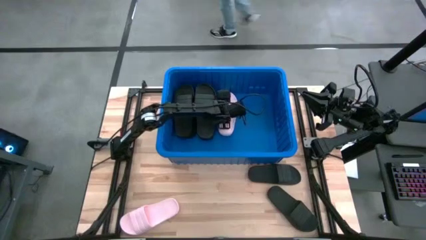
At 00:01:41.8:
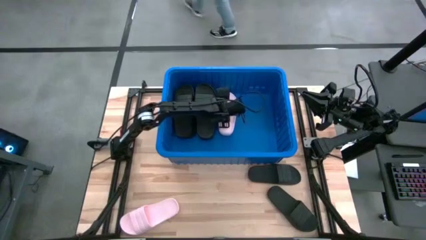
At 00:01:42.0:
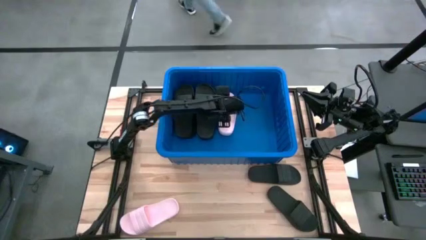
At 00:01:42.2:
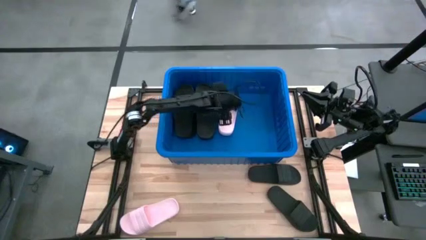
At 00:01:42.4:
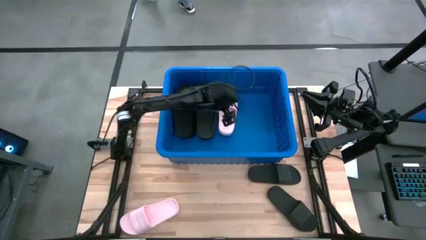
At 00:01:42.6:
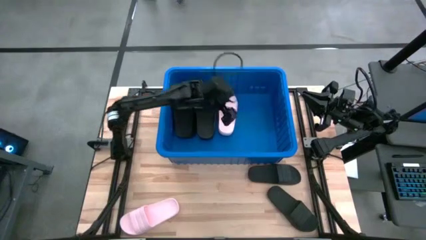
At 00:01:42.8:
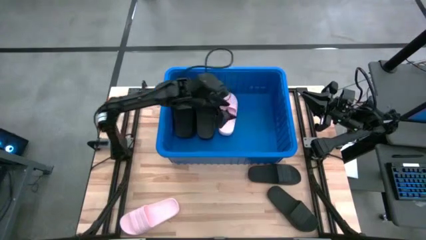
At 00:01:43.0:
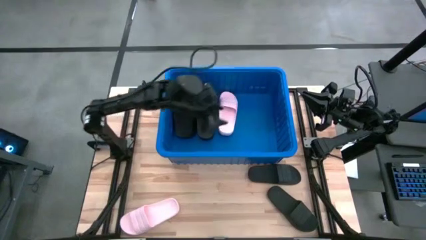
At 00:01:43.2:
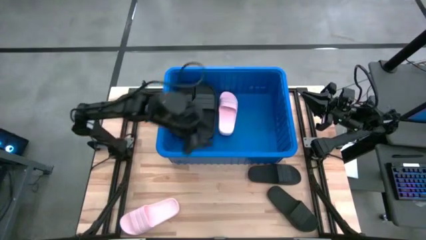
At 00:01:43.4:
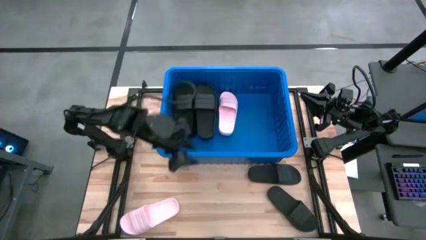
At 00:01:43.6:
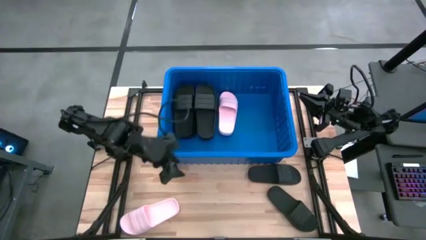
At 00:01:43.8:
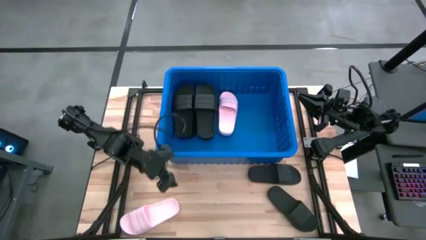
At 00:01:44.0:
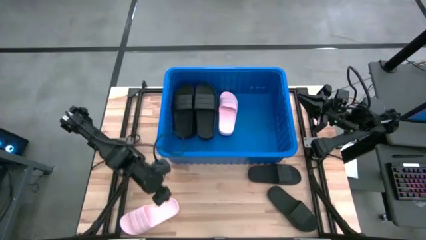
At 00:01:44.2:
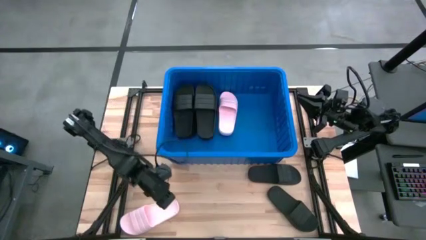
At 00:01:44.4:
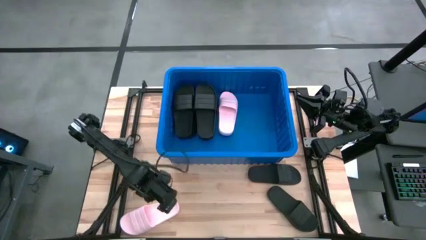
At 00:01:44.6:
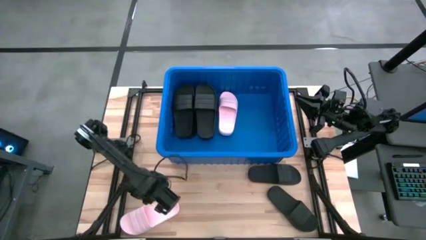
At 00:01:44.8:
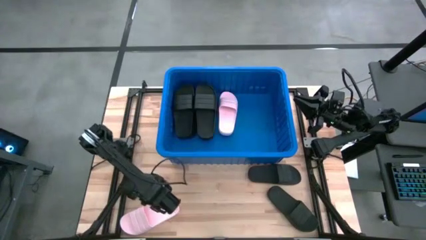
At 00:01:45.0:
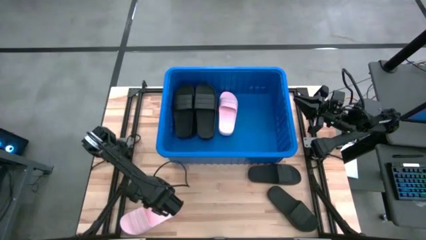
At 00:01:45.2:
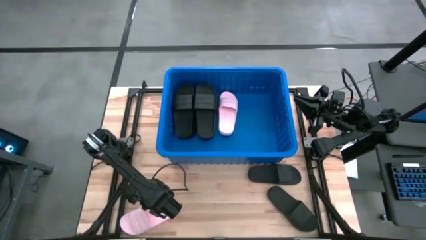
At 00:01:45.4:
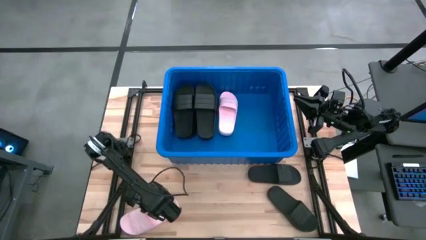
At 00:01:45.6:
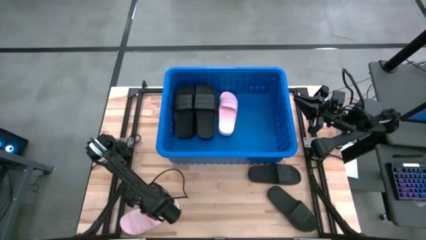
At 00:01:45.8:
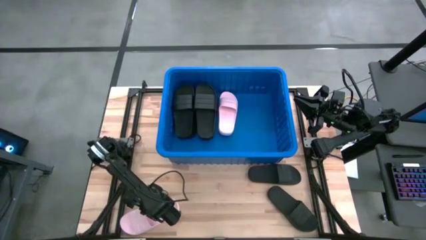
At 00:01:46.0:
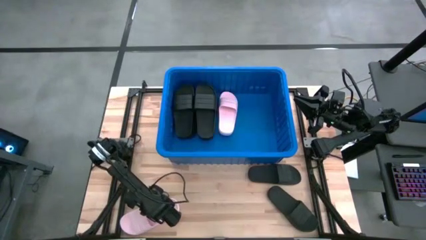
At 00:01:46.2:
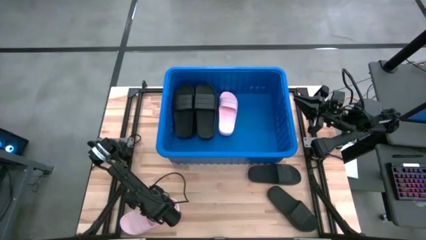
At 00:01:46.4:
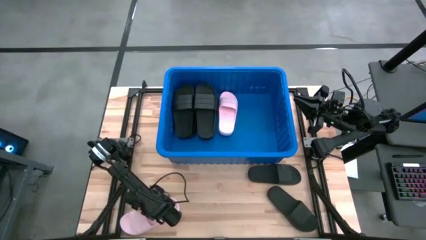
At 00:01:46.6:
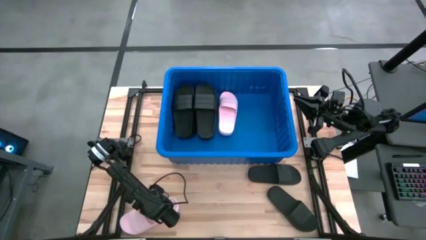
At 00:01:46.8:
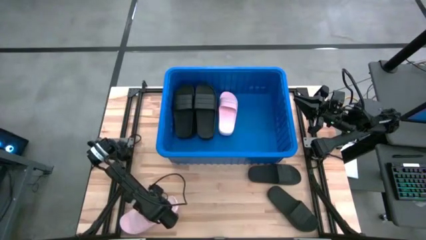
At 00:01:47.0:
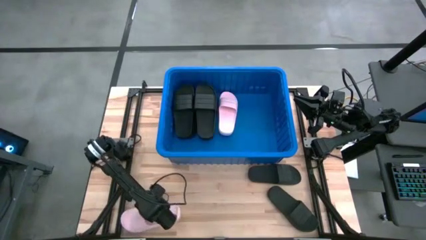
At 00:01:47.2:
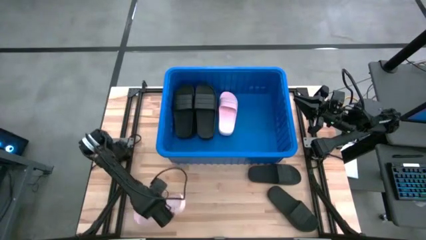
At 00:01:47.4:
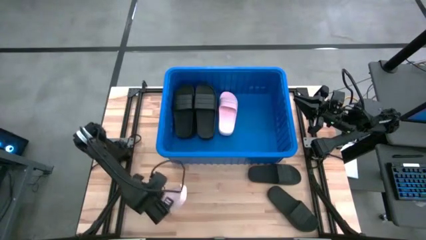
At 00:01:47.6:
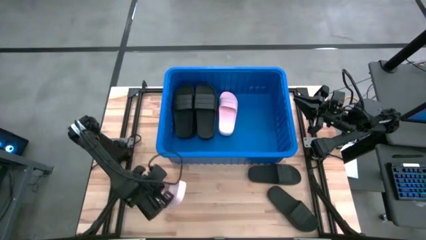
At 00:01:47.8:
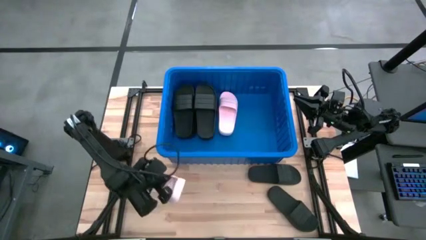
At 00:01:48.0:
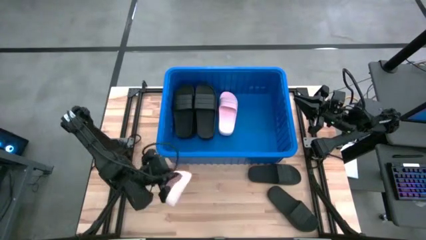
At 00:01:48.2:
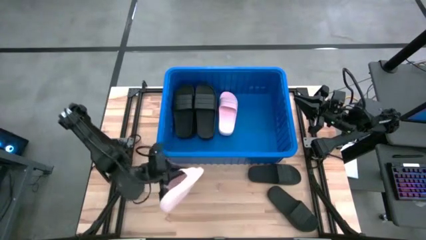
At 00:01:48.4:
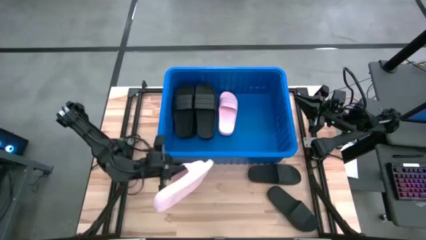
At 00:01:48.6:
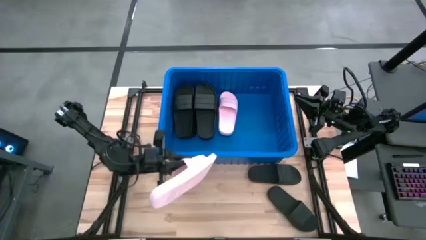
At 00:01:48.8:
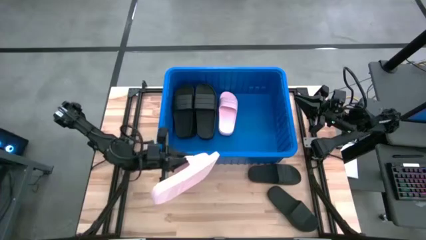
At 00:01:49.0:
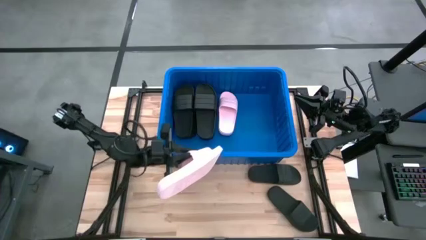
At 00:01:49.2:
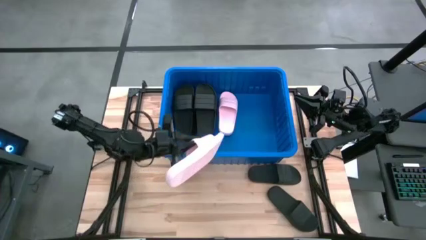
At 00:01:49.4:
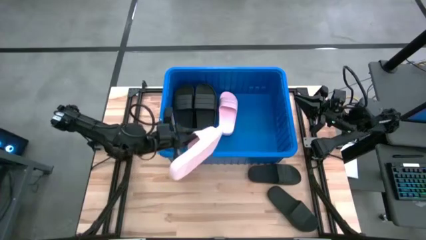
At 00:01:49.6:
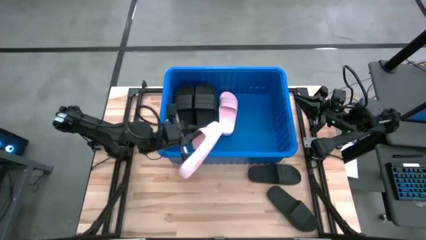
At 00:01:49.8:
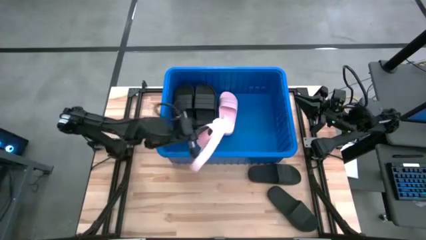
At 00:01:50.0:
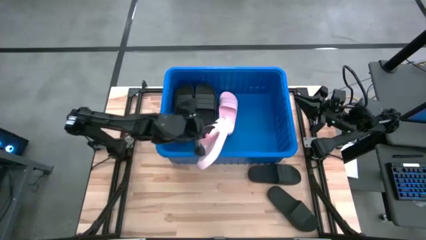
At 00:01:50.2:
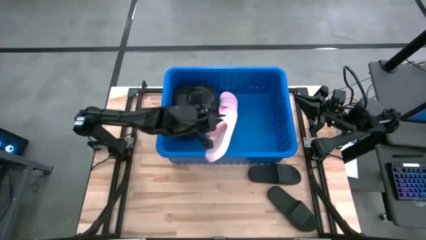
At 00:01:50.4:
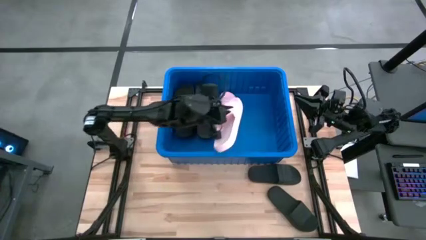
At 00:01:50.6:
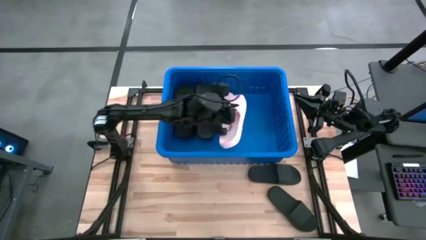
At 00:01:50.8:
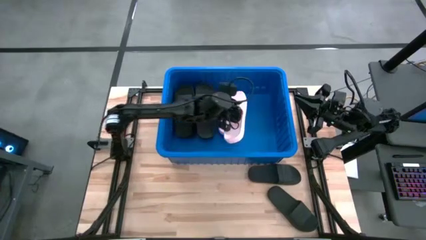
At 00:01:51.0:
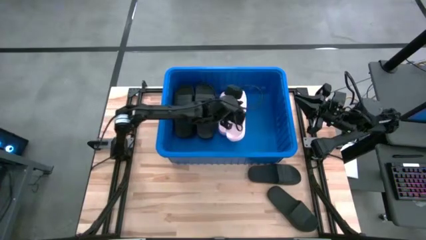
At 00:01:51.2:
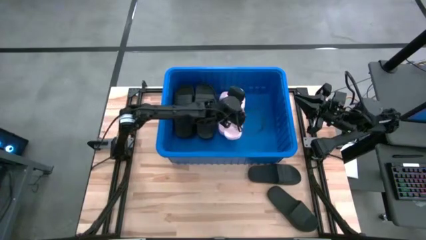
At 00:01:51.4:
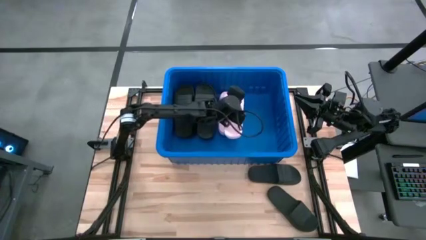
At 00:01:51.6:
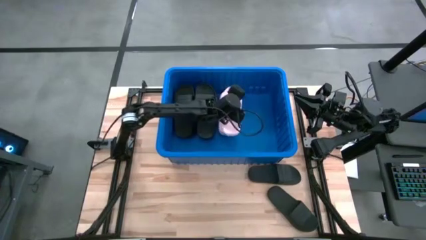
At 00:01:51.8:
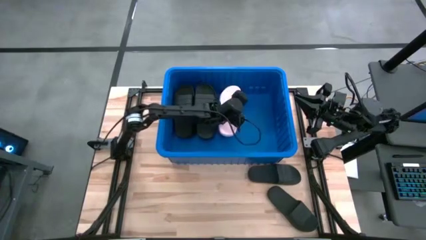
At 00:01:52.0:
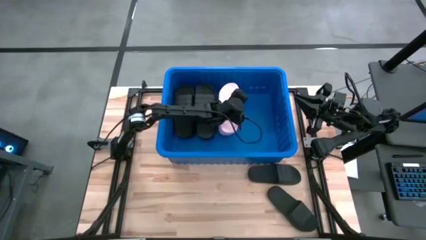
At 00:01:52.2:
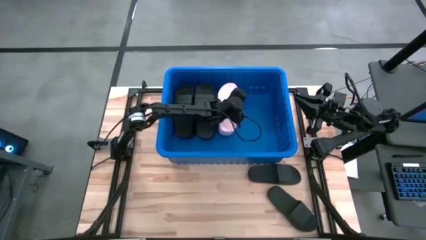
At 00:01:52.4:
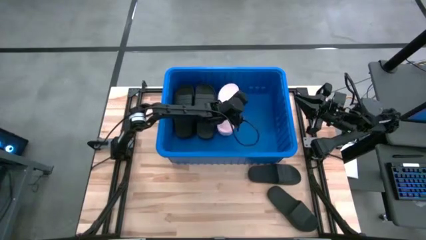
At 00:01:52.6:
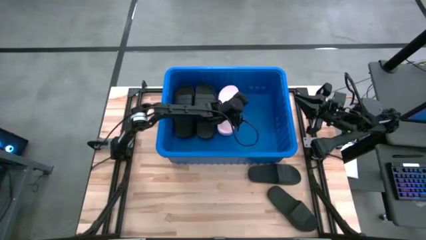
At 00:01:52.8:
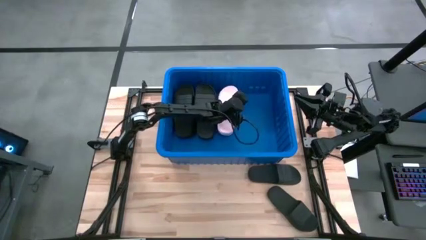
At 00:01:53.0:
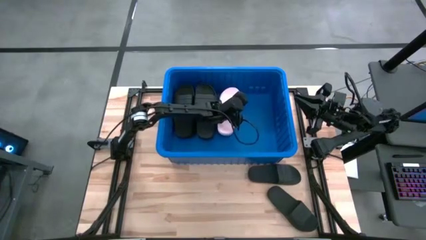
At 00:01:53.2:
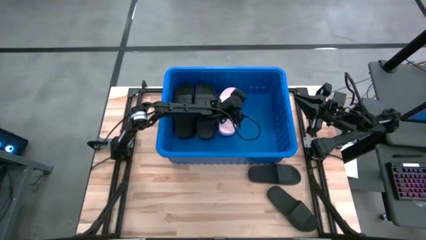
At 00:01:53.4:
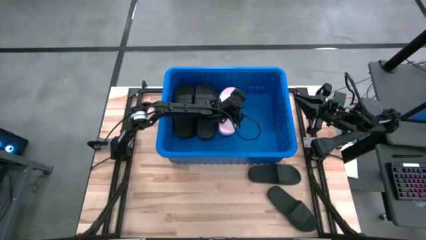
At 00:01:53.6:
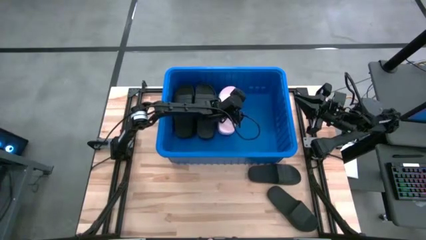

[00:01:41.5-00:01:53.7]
Task: Pick and place slides into bin
Put the pink slide into the blue bin
